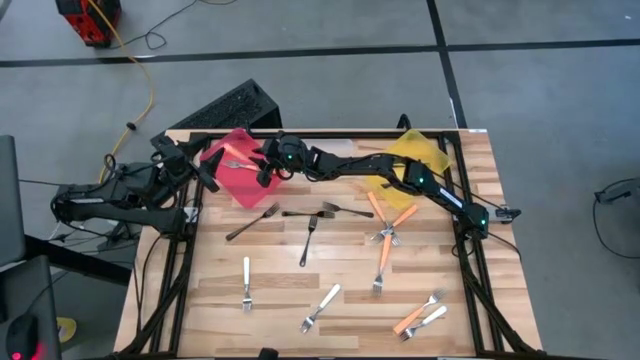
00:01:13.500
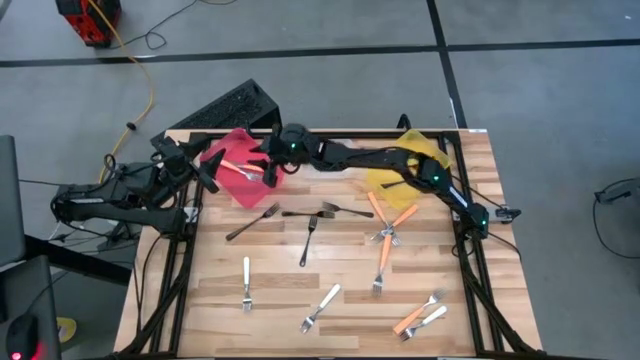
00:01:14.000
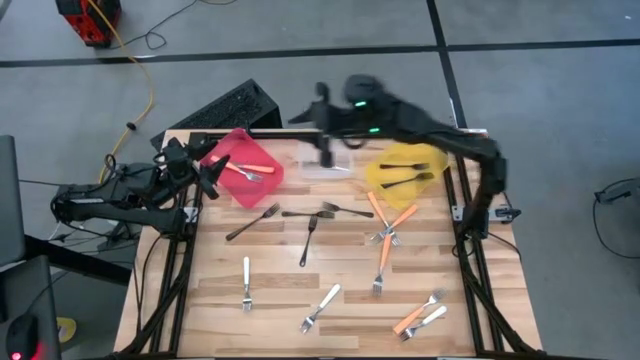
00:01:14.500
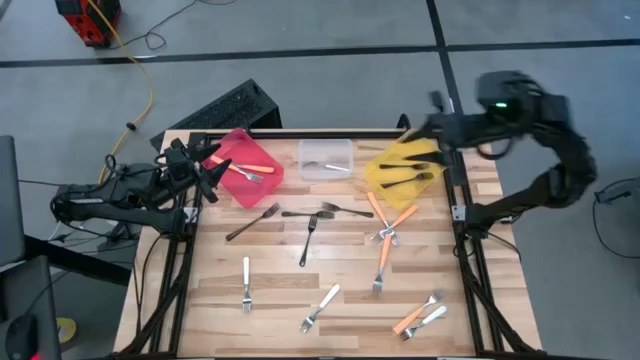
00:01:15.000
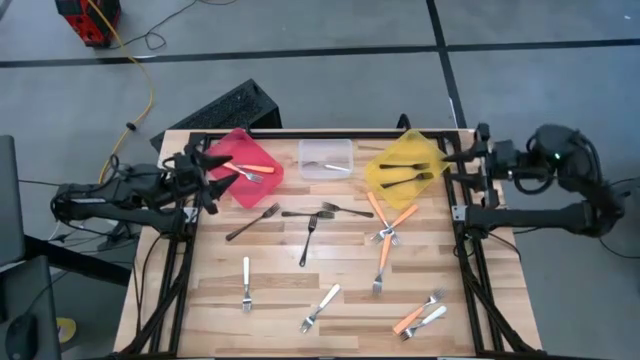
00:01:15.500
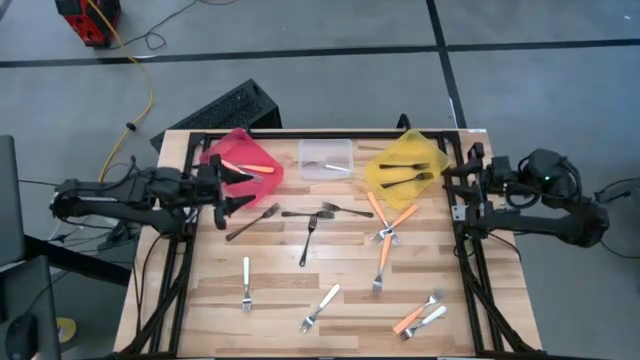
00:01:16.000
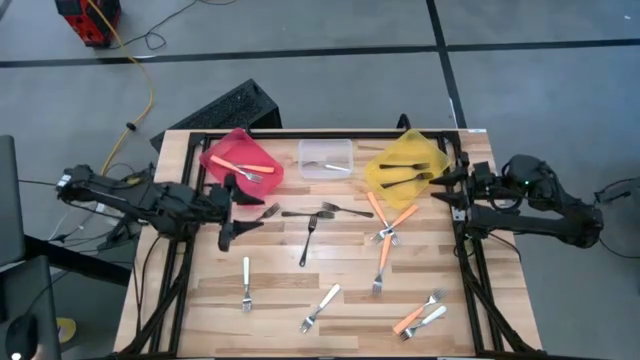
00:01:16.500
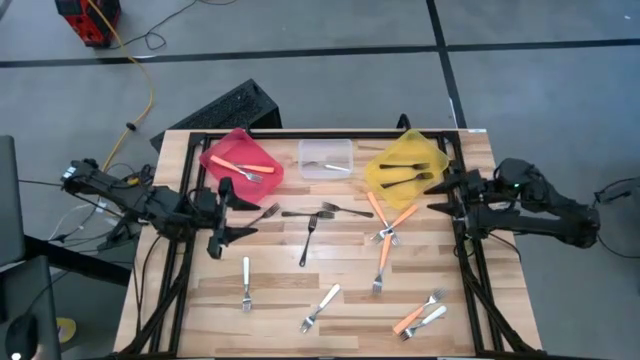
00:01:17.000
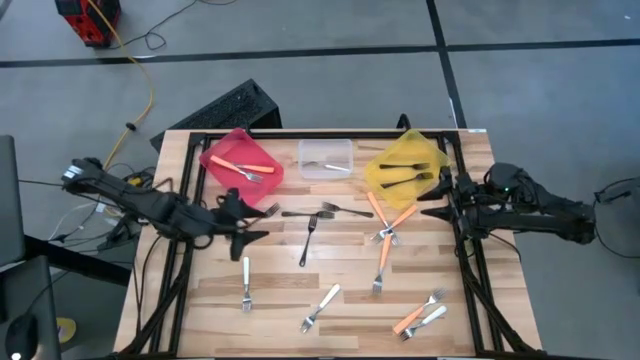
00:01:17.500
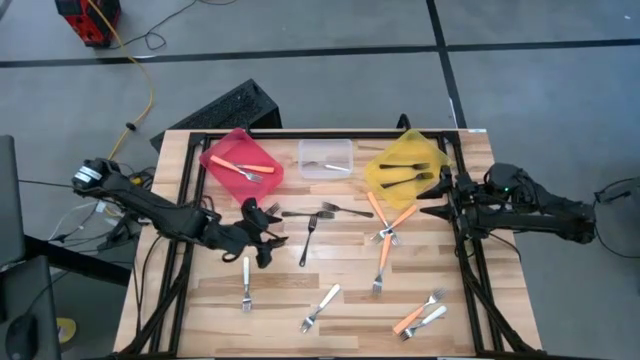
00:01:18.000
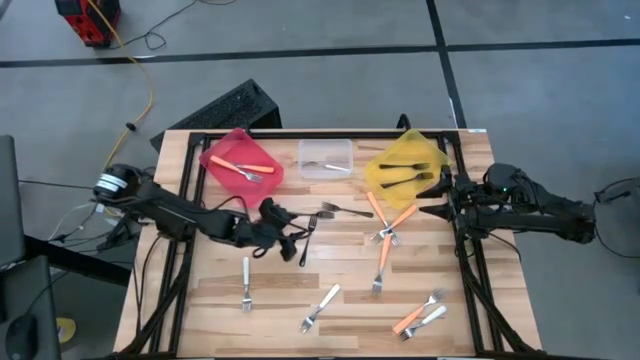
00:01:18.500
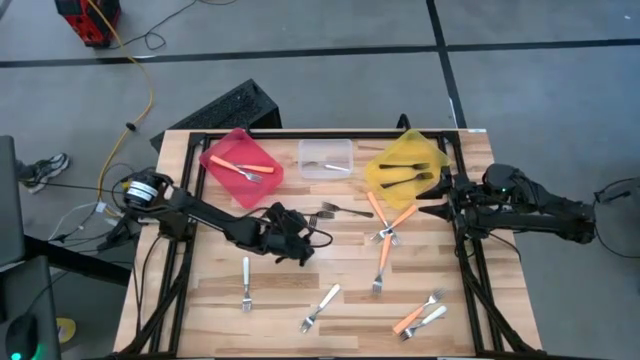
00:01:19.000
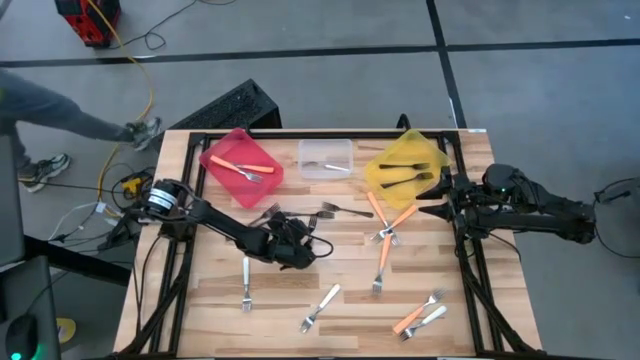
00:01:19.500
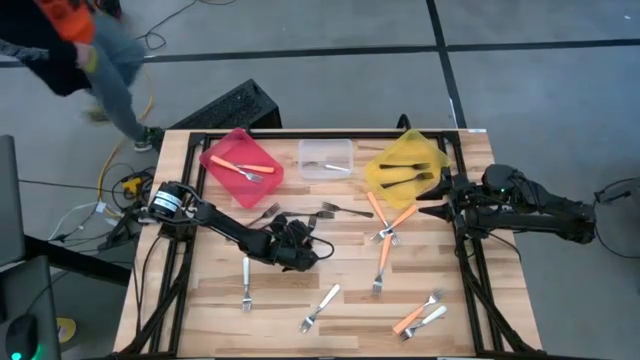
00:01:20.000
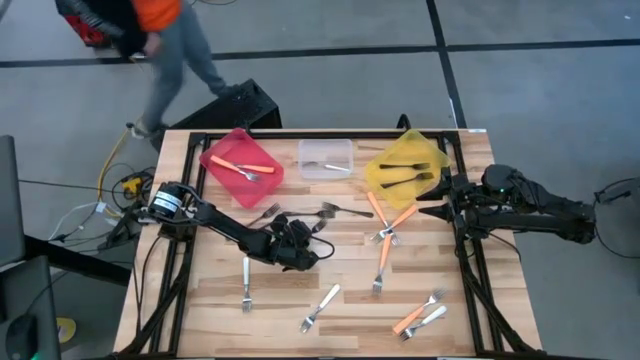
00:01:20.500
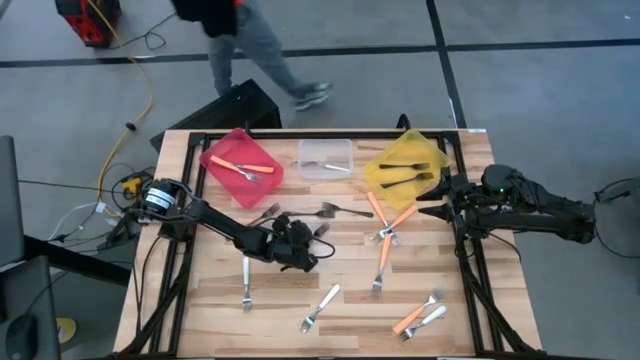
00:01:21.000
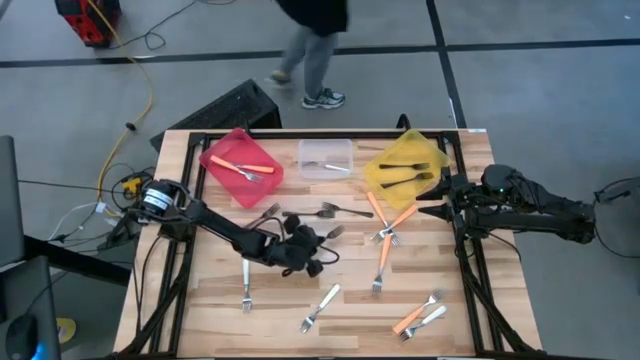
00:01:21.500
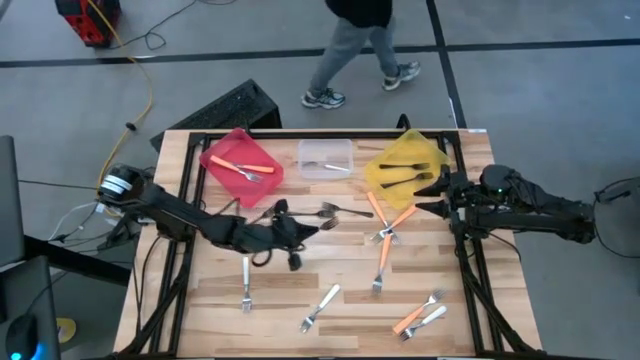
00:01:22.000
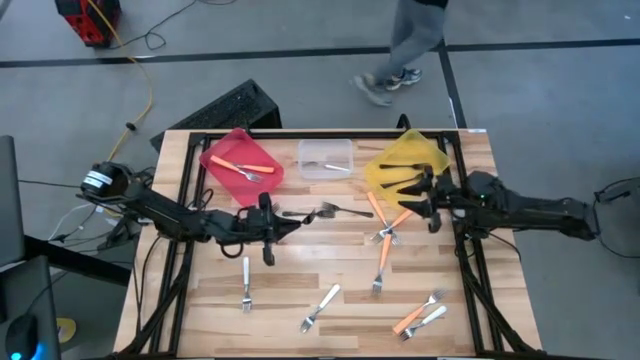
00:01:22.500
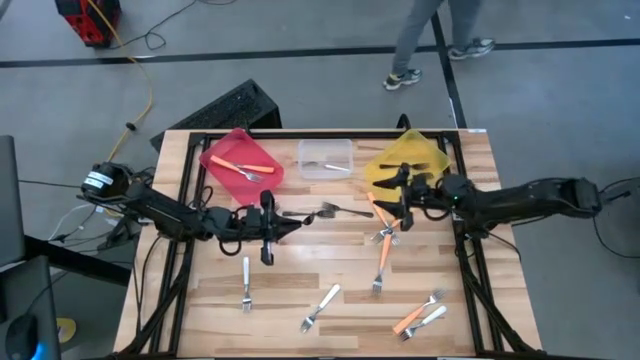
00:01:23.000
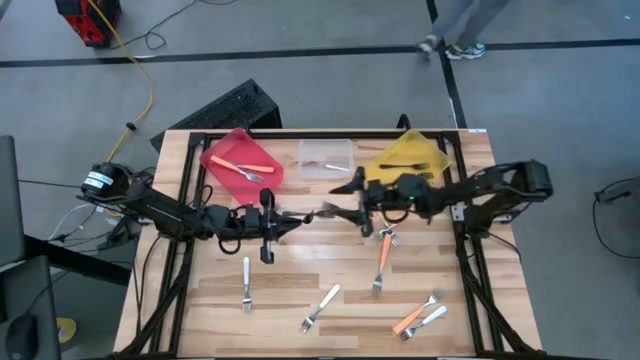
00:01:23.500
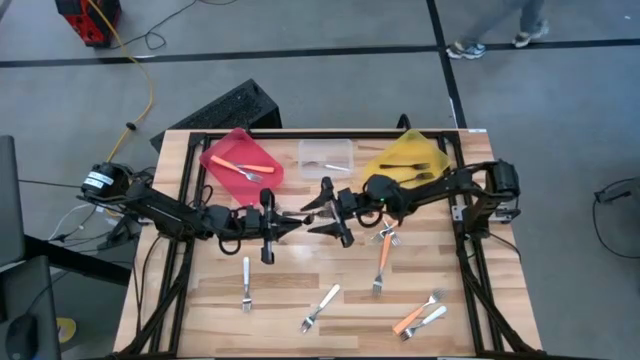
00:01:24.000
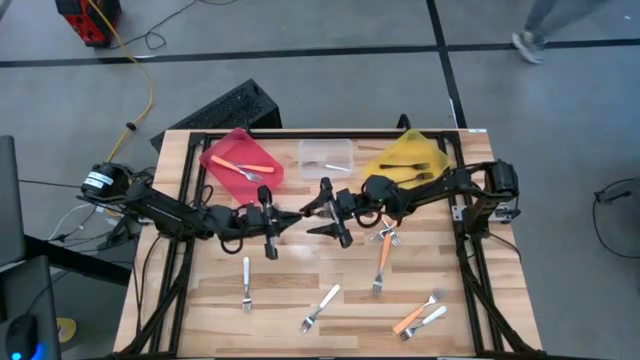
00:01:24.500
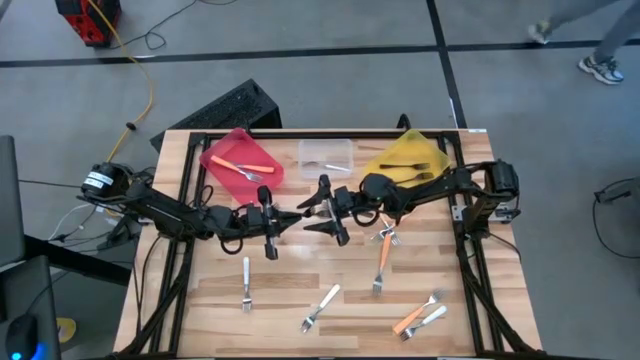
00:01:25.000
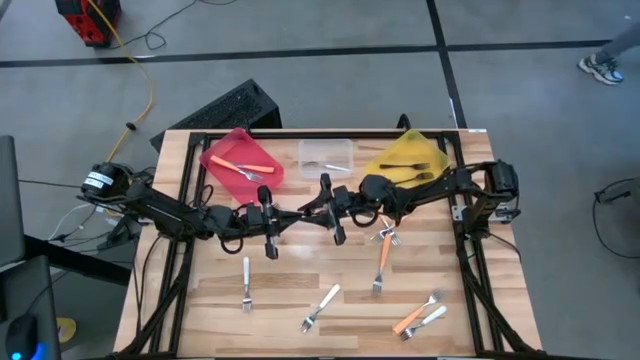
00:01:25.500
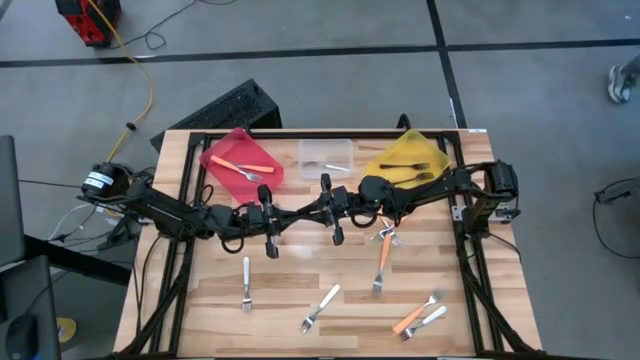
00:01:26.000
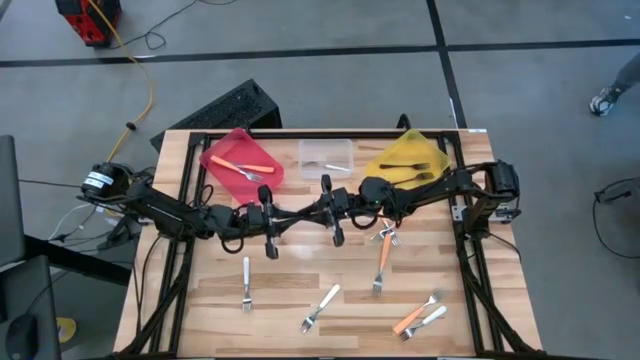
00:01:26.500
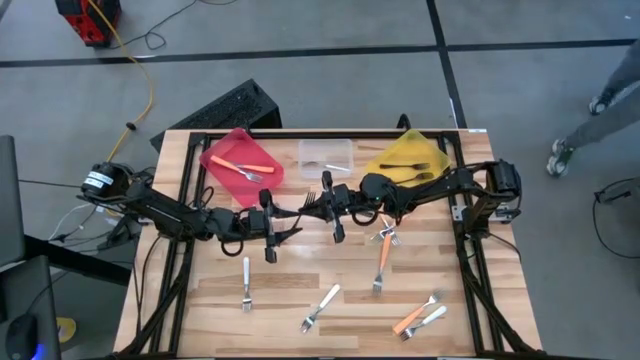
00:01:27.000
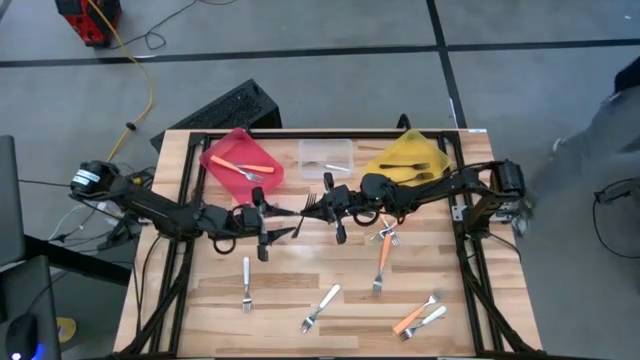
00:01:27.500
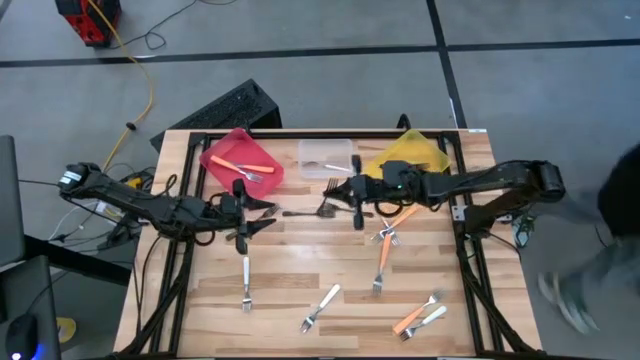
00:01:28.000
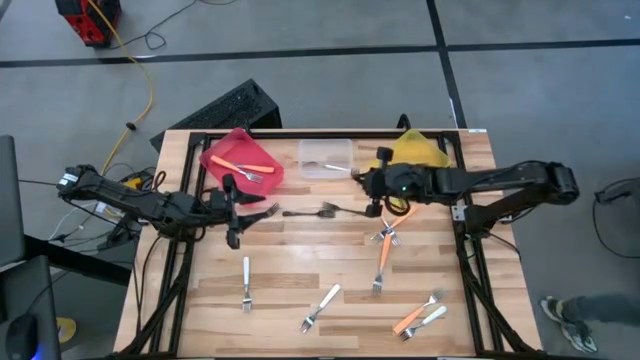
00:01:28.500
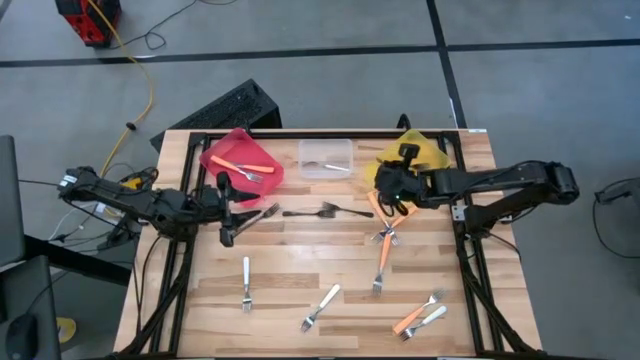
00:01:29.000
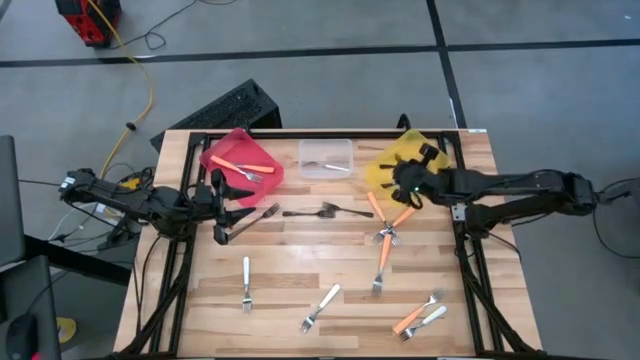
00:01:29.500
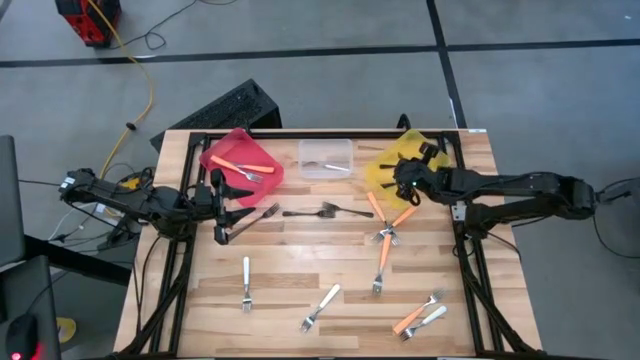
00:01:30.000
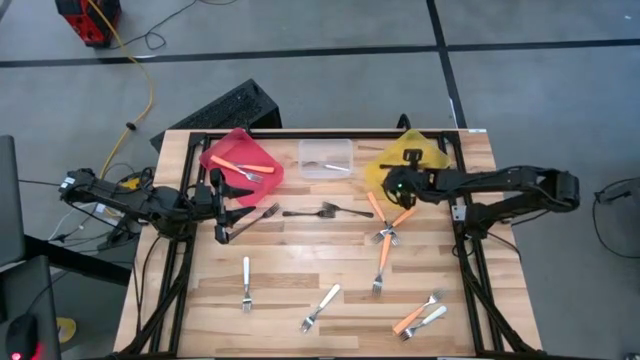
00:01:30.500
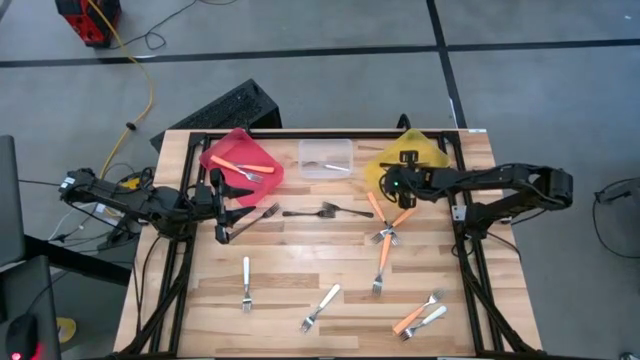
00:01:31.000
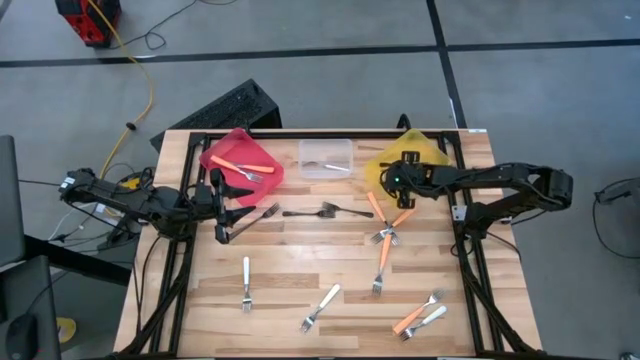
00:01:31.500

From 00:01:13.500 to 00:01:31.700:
Task: Sort silverware by color (type)
Put the black fork into the yellow bin

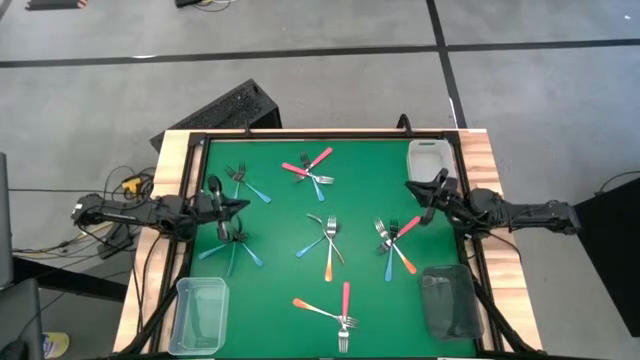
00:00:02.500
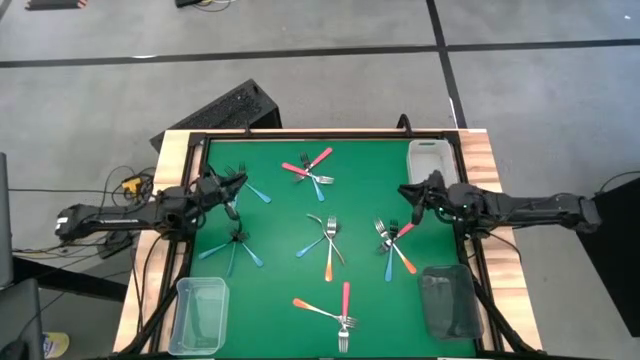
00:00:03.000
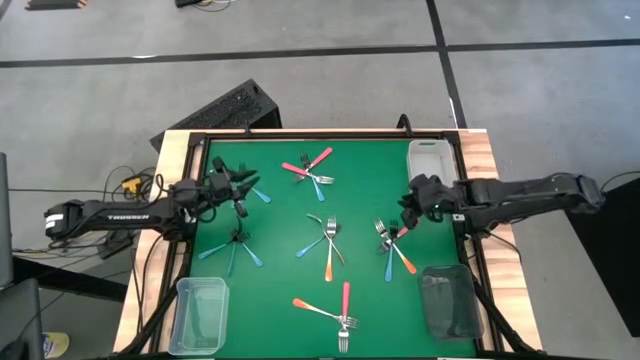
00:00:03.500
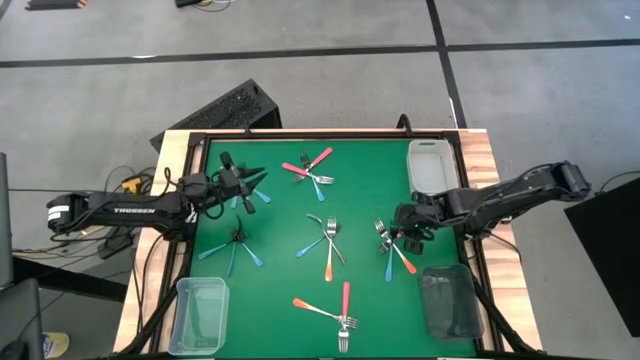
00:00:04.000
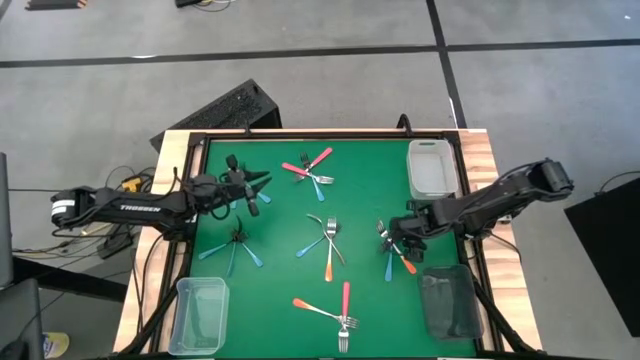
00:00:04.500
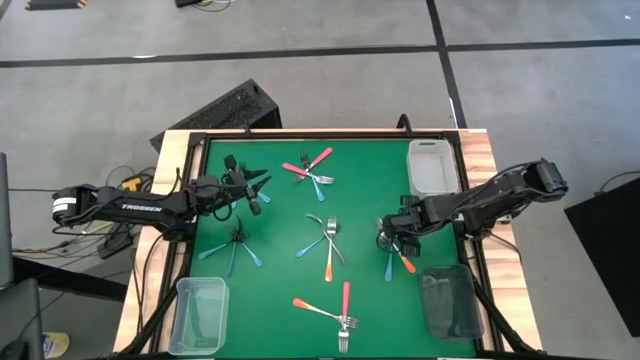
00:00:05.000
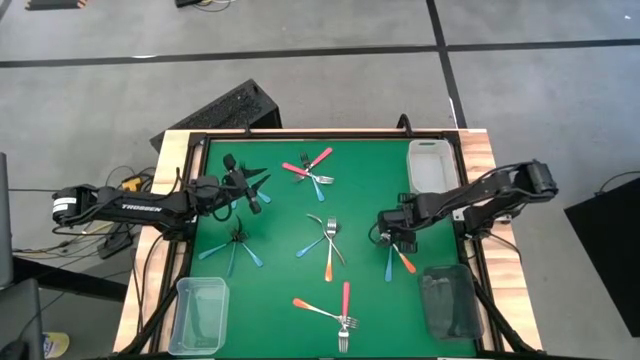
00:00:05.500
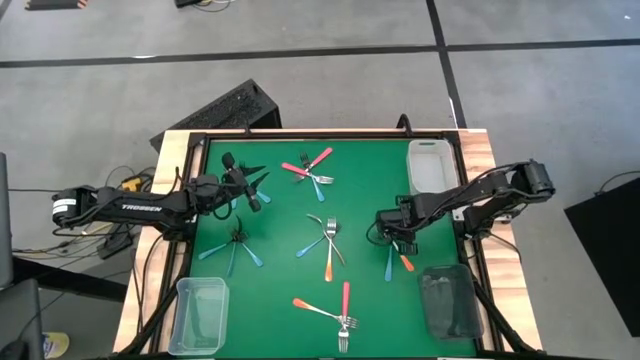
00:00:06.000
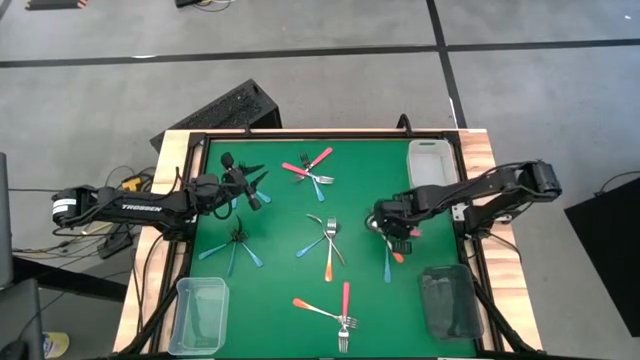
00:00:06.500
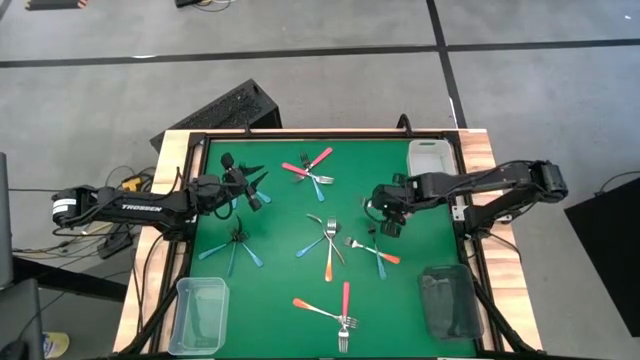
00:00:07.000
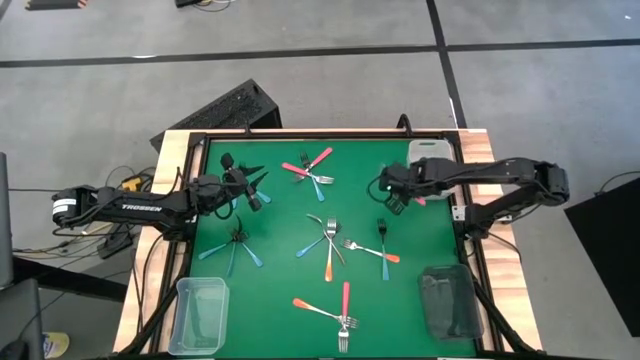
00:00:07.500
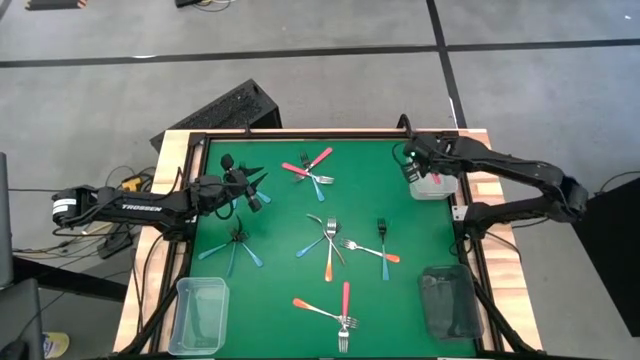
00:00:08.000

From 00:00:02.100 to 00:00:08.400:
Task: Sort silverware by color (type)
Put the pink fork into the white bin
